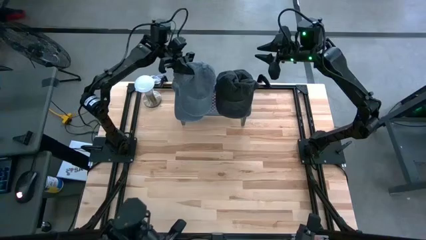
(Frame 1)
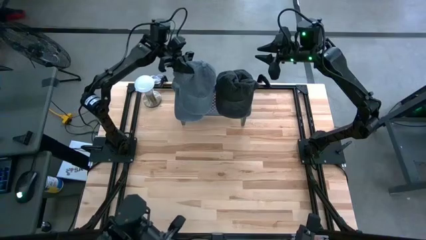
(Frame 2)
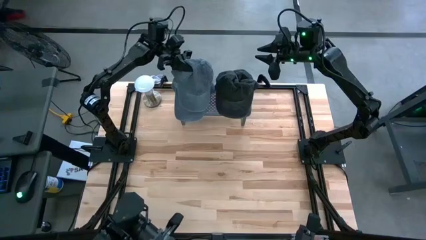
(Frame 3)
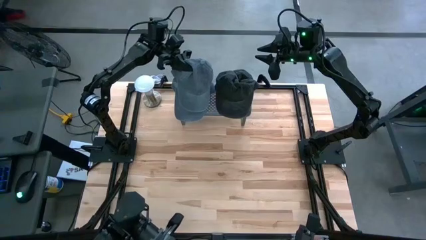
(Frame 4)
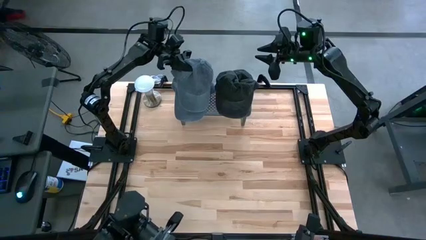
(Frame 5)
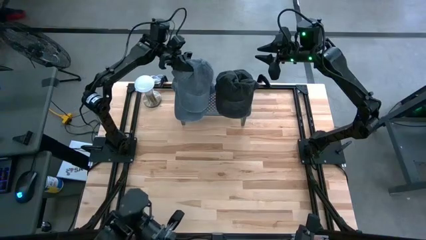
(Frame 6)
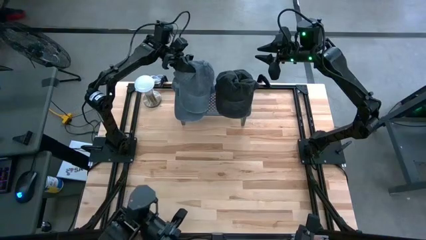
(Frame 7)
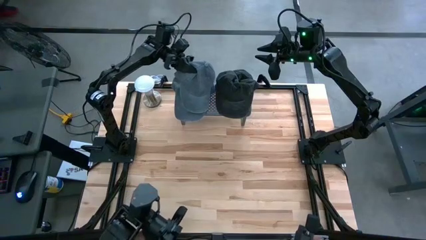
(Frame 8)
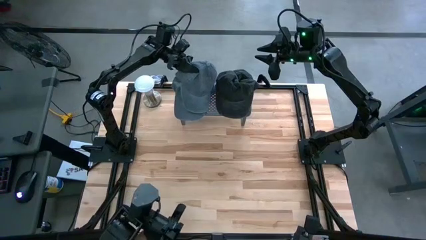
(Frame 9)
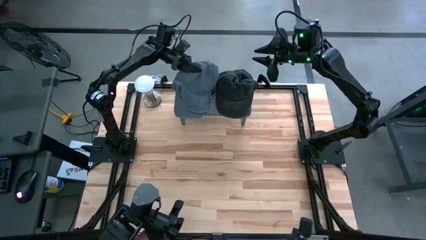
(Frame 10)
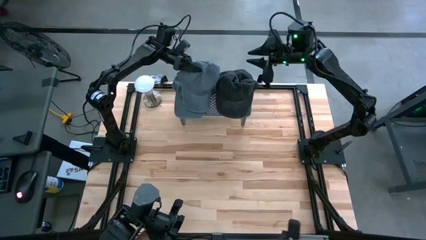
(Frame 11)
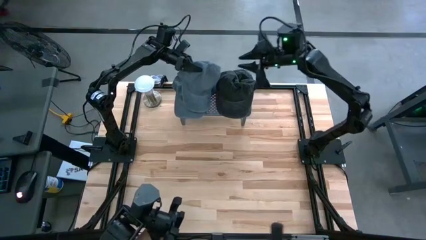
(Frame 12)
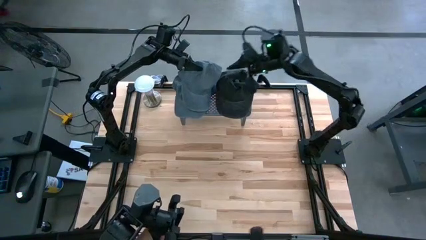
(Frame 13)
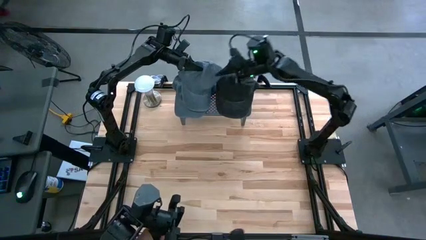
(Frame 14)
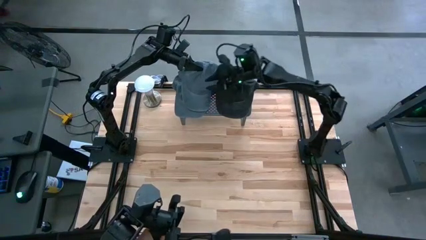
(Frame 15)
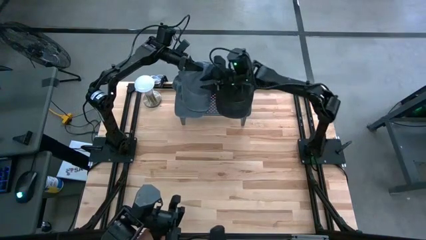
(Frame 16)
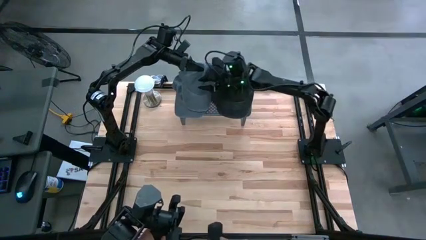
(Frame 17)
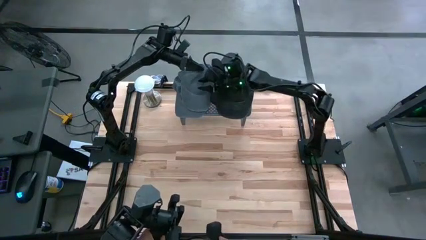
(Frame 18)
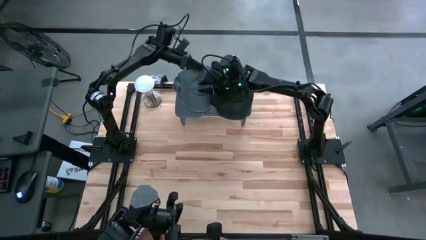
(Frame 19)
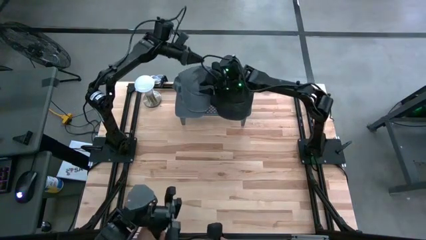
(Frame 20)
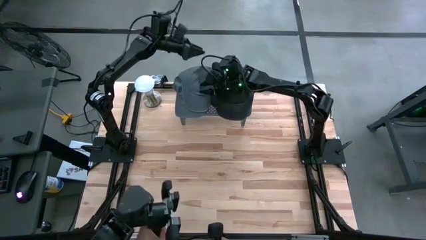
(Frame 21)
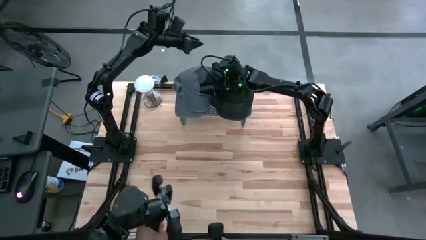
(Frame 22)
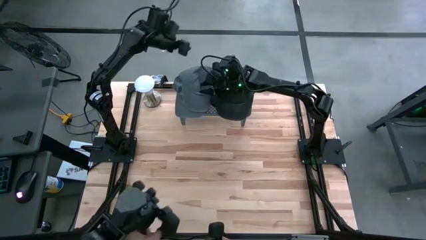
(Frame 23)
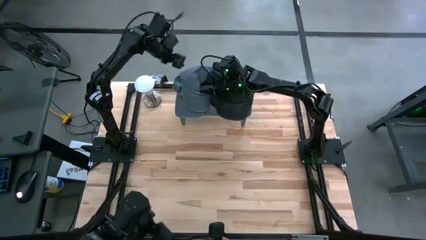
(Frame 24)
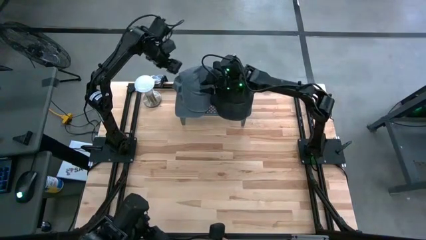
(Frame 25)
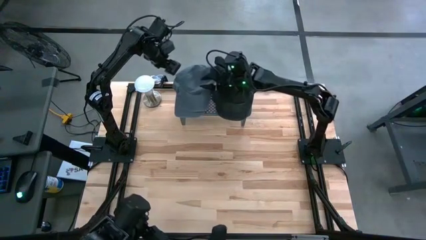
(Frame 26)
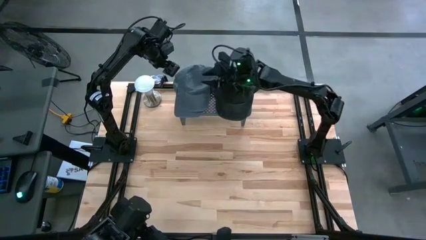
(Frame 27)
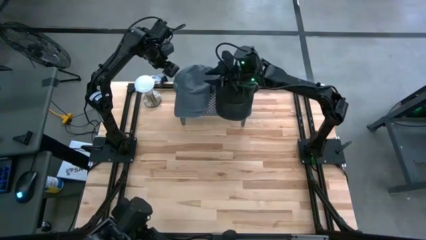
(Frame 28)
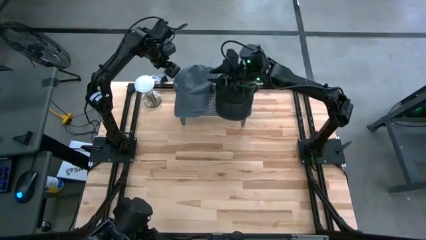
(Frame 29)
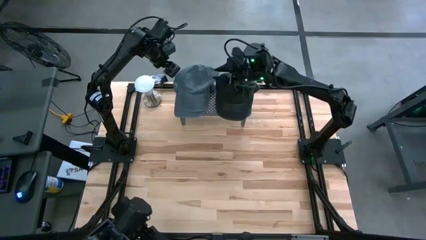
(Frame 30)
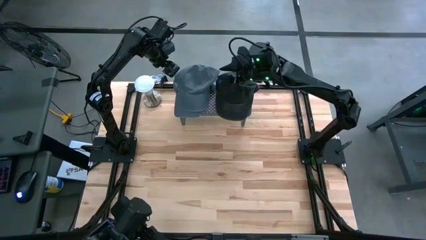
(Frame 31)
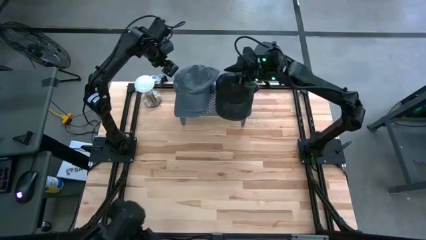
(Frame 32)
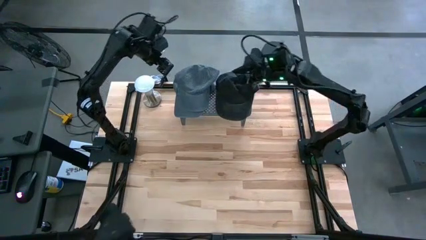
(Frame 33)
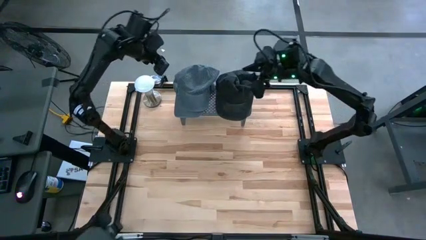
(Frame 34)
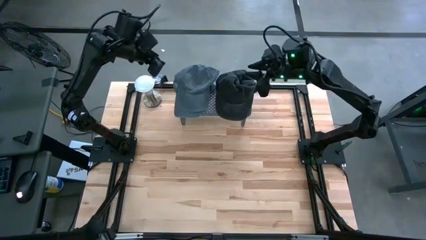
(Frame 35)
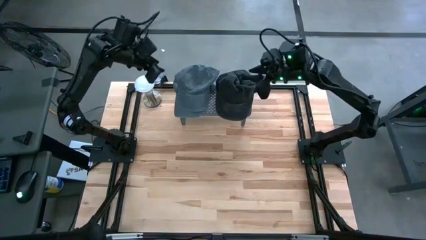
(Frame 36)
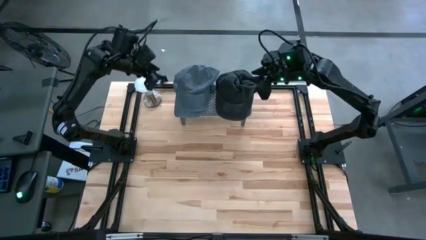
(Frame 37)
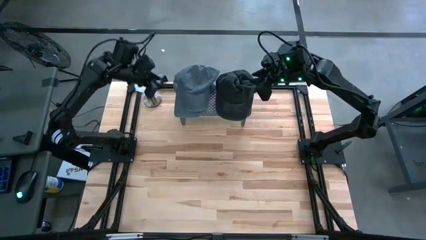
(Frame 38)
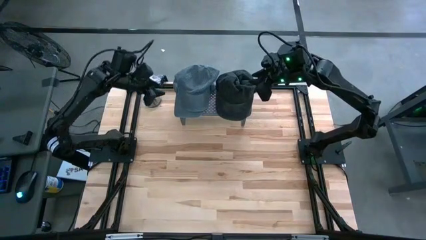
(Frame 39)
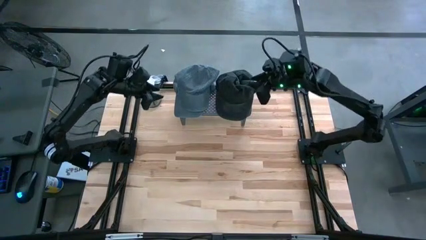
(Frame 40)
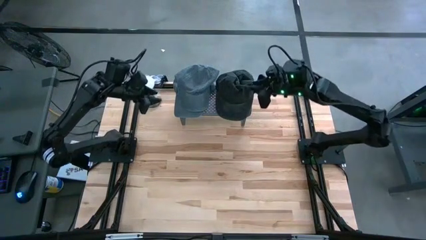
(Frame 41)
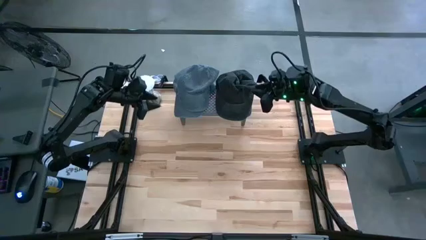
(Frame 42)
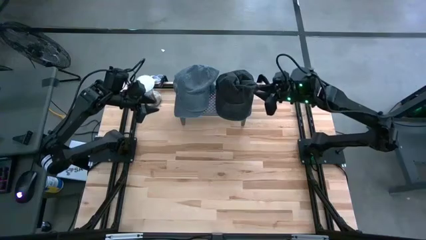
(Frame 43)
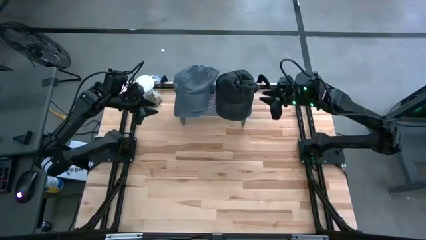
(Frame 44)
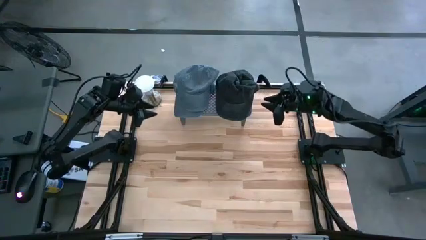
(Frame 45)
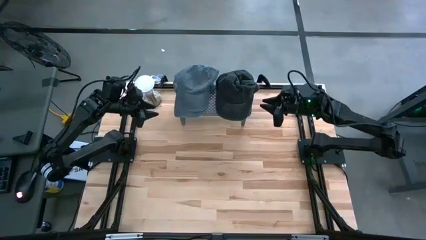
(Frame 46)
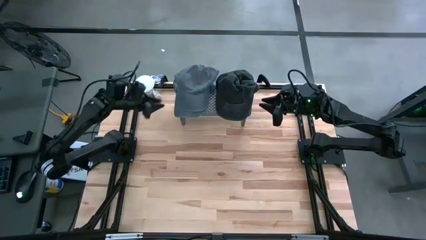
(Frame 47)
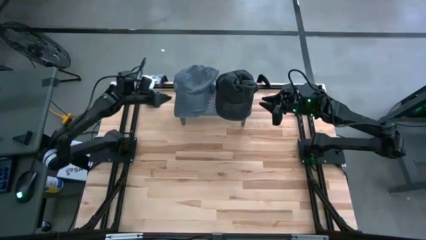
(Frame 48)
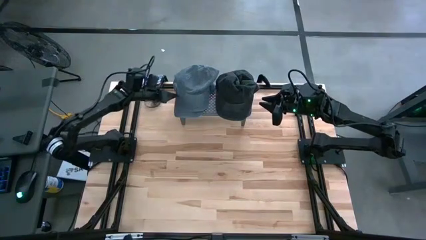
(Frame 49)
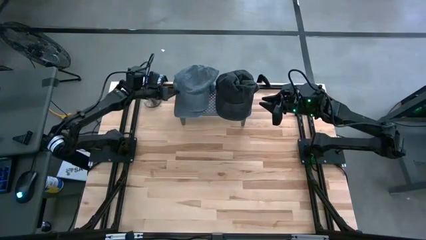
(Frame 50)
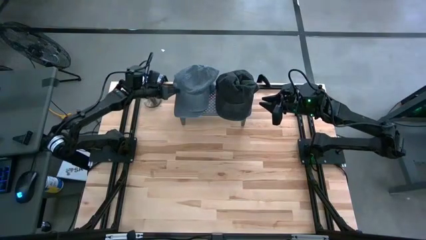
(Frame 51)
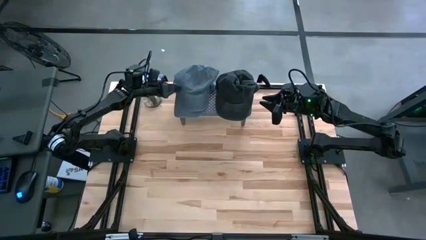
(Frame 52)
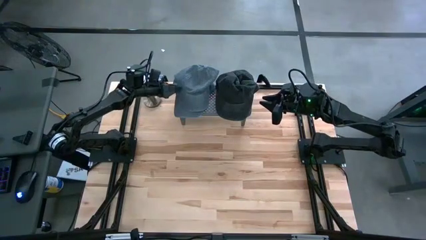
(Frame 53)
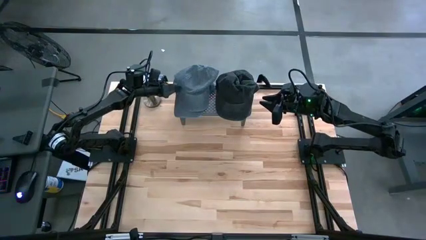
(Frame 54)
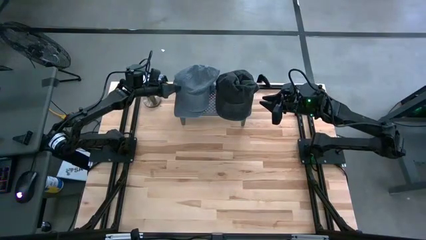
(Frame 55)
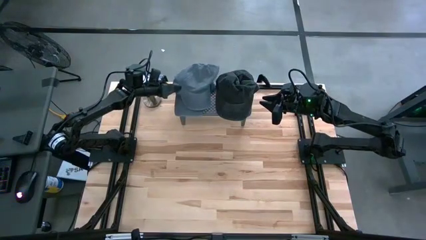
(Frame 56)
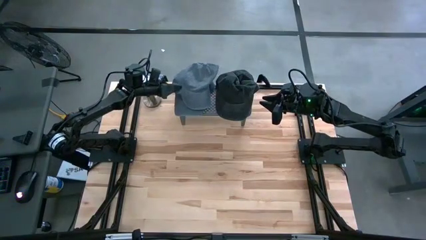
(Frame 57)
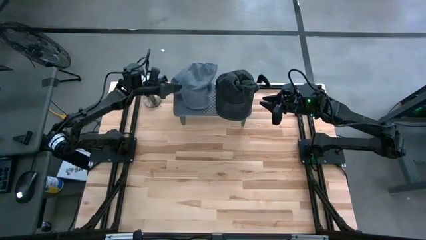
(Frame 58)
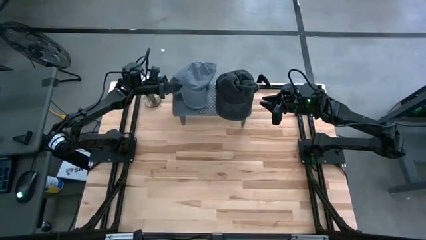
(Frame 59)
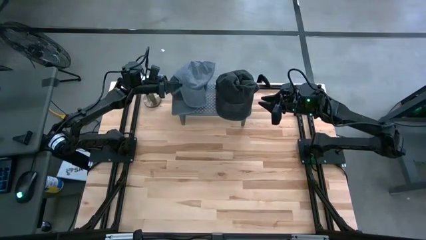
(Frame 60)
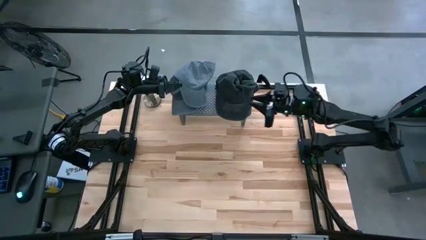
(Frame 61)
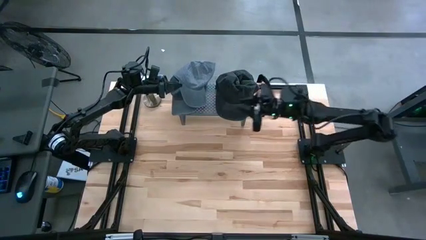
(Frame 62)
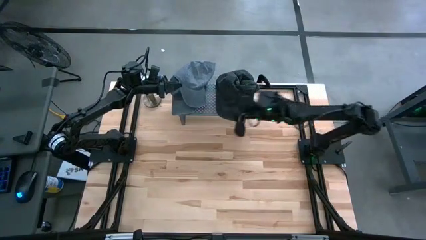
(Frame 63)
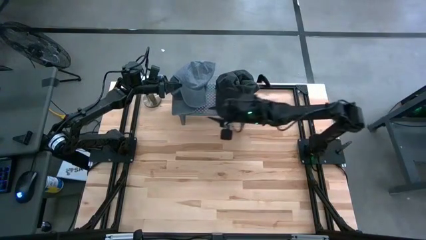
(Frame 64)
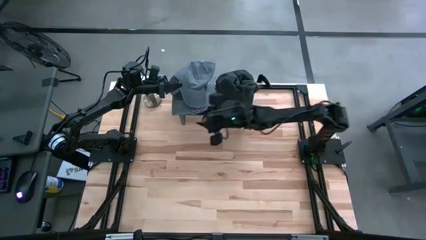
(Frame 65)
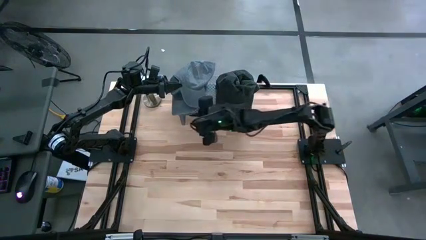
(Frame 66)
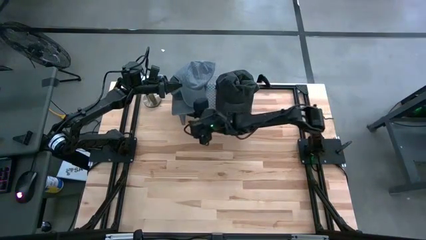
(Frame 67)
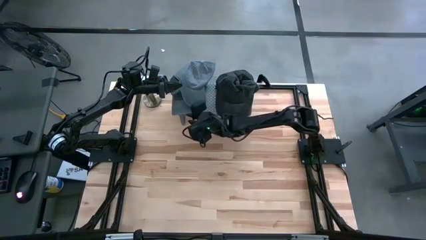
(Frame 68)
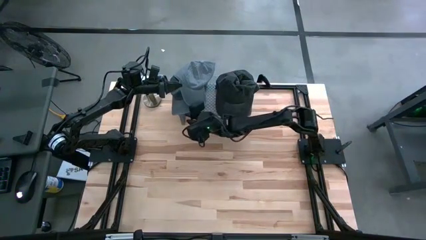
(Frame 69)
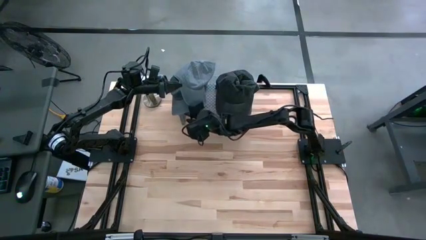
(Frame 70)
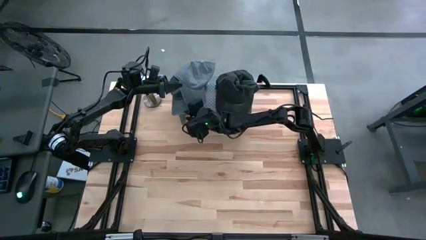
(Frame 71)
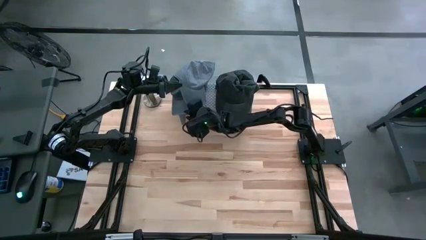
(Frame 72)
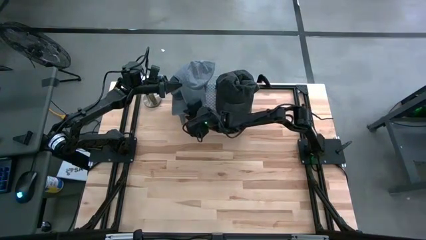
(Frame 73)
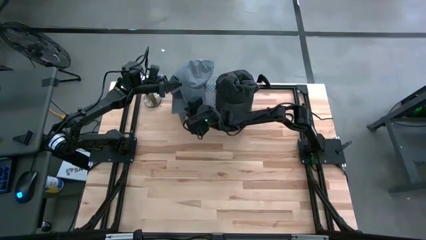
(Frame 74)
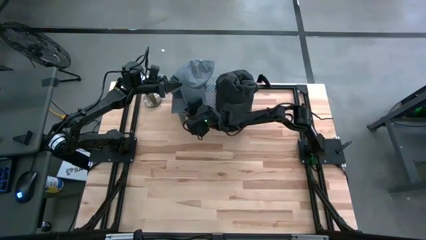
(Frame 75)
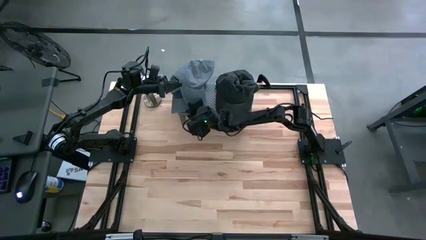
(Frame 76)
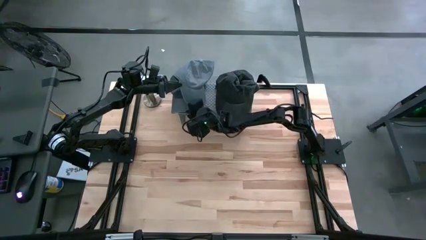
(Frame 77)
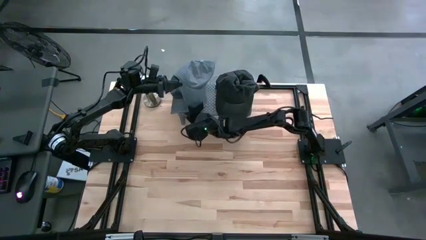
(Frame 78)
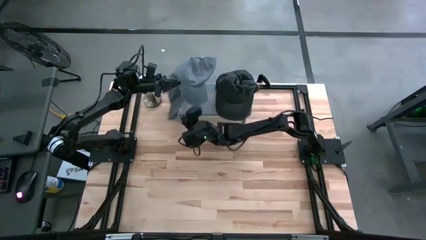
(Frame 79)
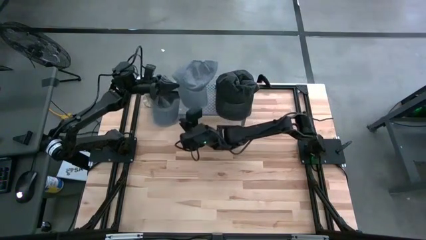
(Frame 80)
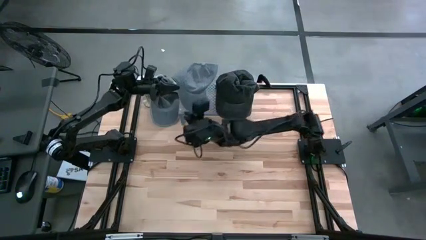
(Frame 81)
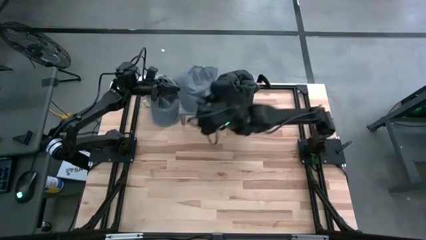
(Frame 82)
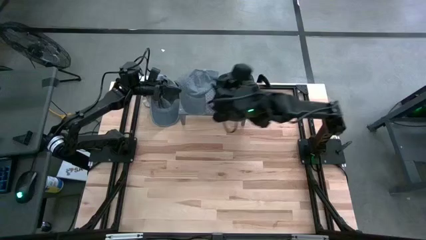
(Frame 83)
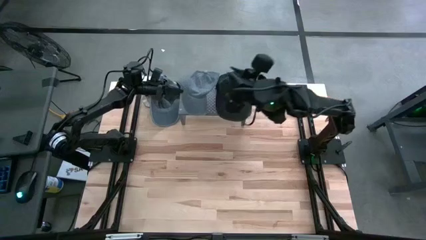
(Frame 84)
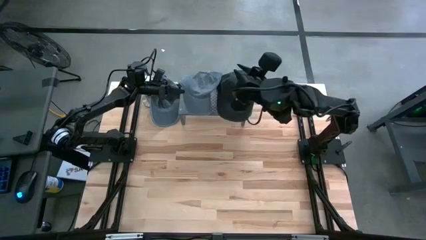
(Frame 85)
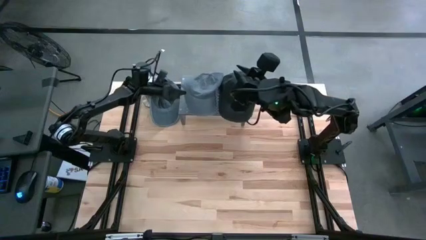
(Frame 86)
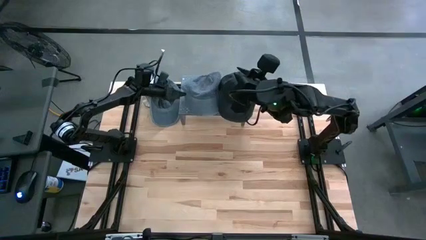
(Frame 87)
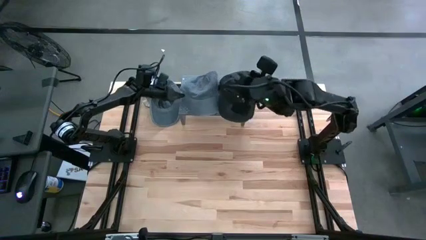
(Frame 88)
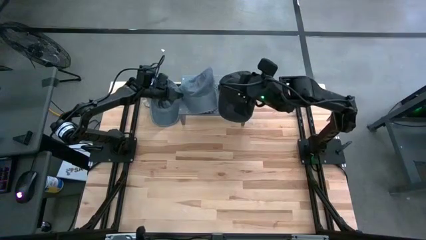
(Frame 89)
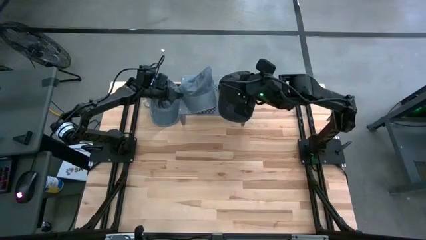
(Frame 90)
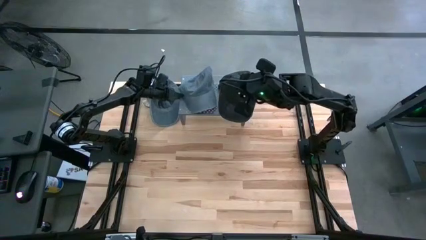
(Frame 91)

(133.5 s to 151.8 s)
Task: Pick & Place hat
Stack the gray cap on top of the other gray cap on the shelf
